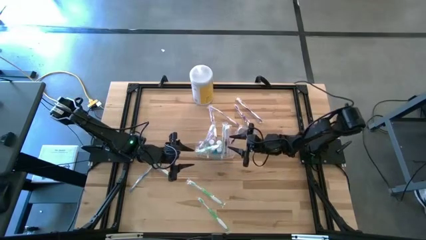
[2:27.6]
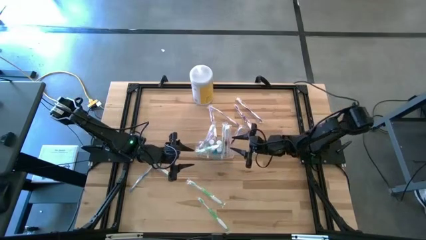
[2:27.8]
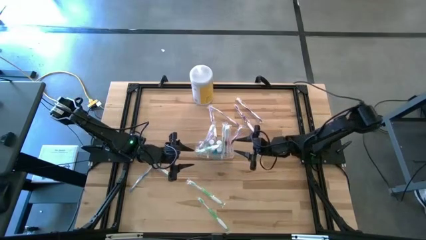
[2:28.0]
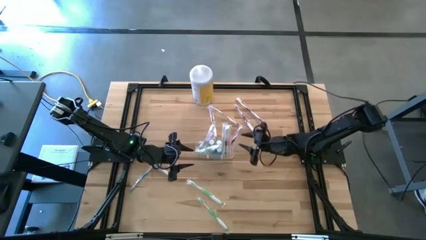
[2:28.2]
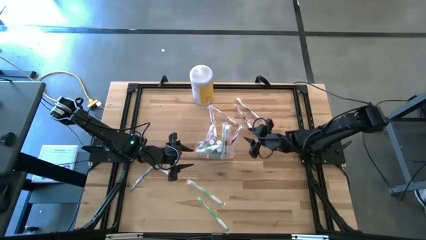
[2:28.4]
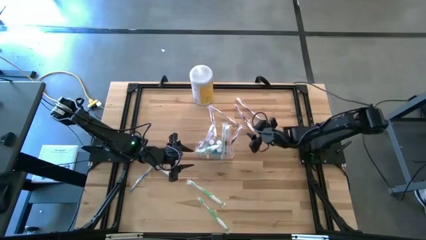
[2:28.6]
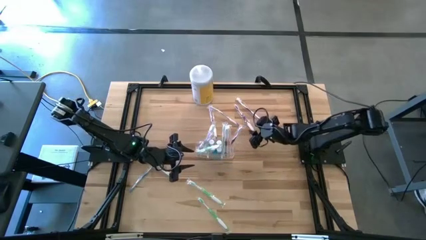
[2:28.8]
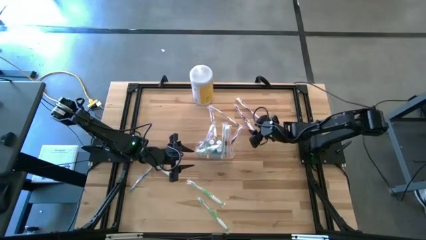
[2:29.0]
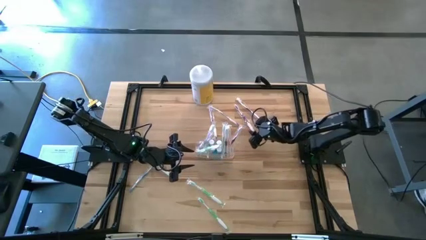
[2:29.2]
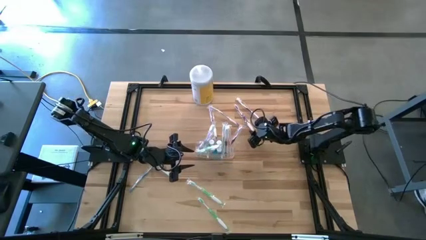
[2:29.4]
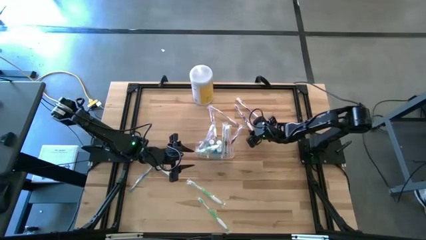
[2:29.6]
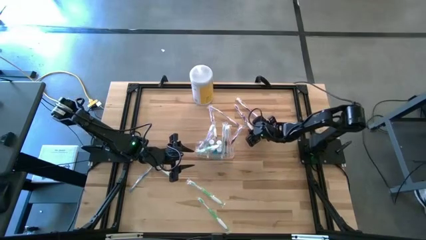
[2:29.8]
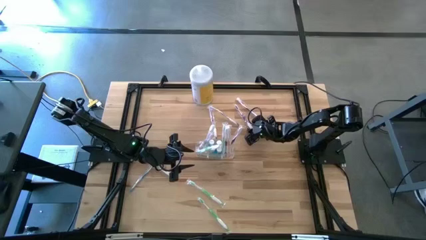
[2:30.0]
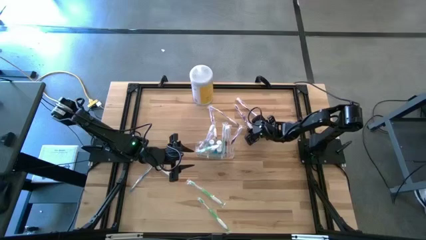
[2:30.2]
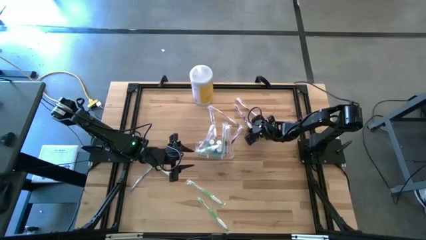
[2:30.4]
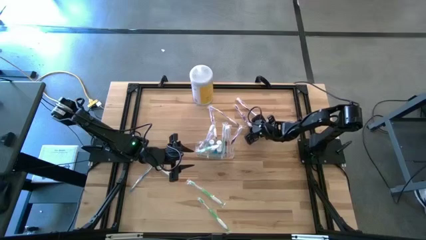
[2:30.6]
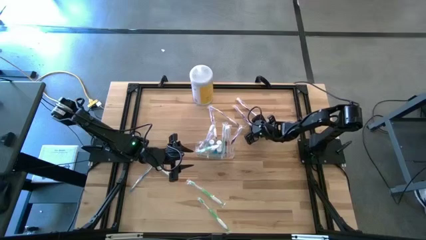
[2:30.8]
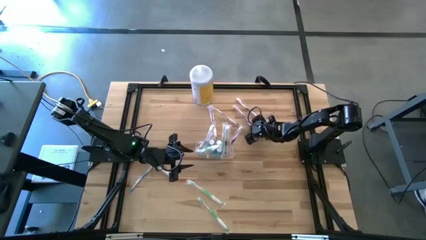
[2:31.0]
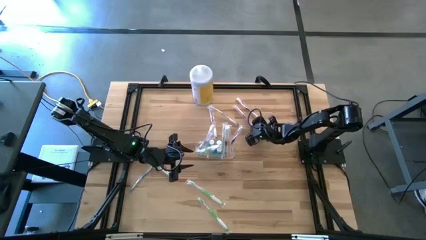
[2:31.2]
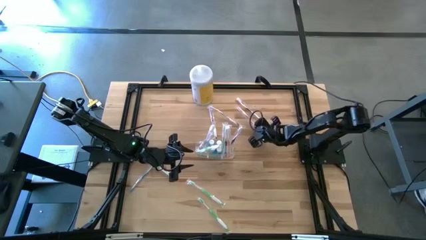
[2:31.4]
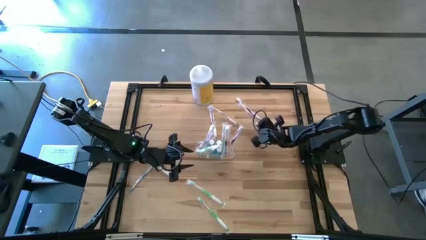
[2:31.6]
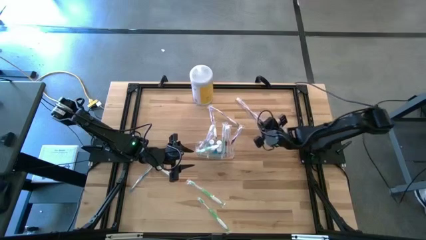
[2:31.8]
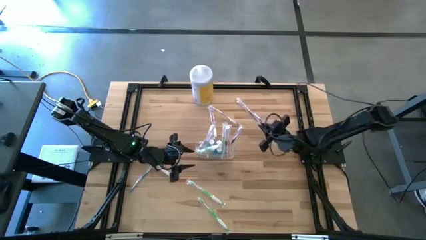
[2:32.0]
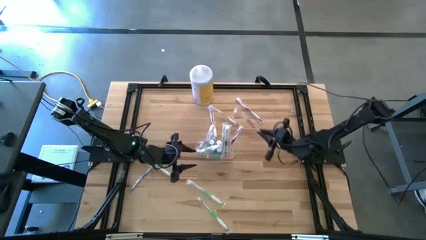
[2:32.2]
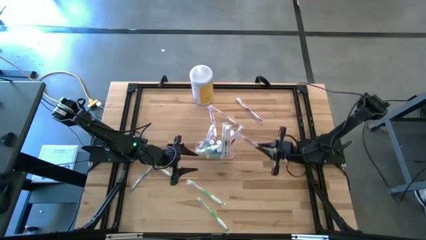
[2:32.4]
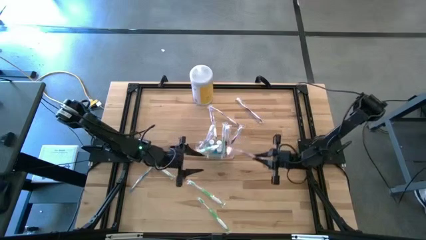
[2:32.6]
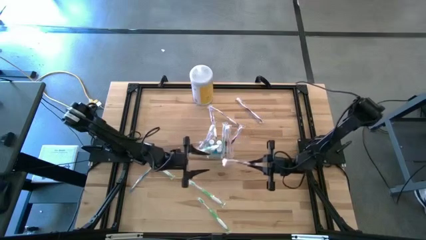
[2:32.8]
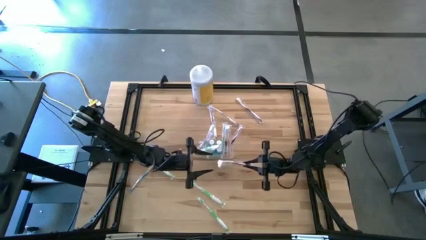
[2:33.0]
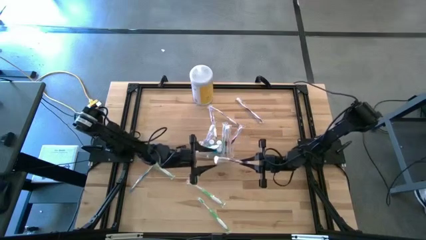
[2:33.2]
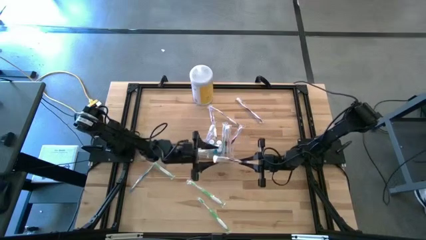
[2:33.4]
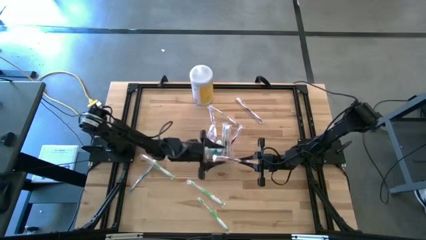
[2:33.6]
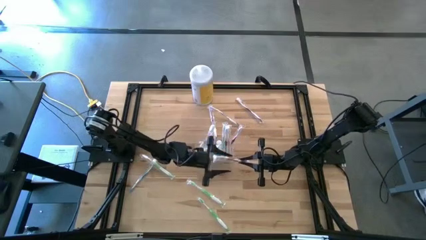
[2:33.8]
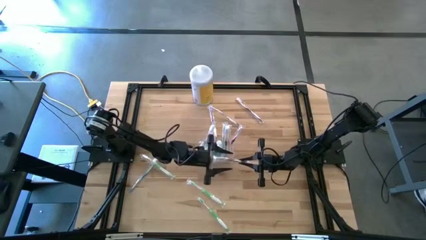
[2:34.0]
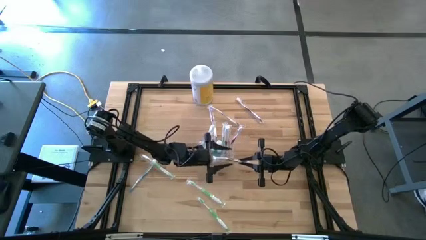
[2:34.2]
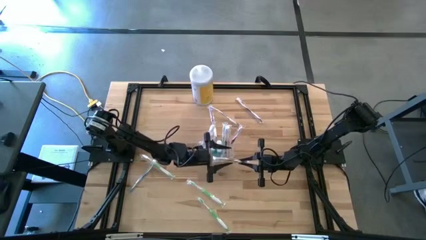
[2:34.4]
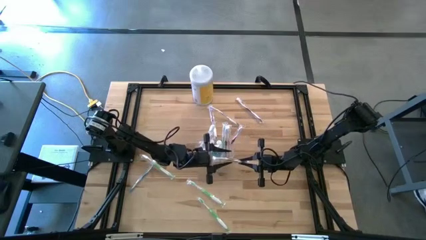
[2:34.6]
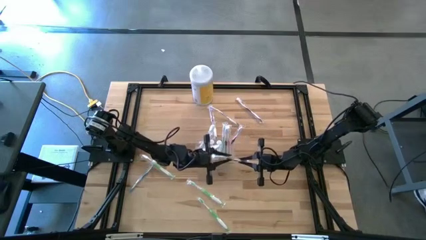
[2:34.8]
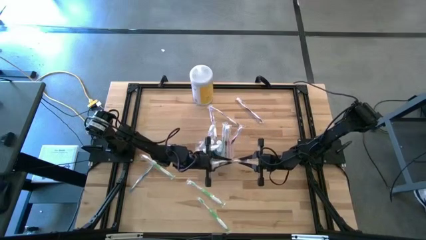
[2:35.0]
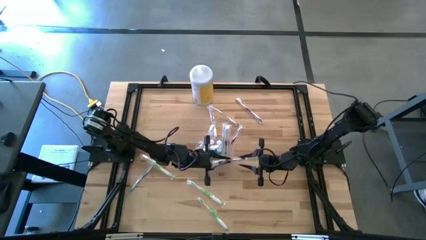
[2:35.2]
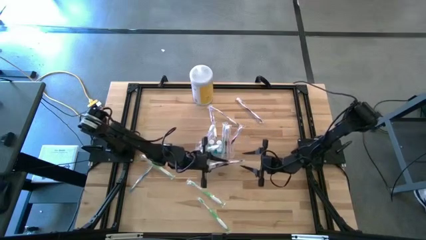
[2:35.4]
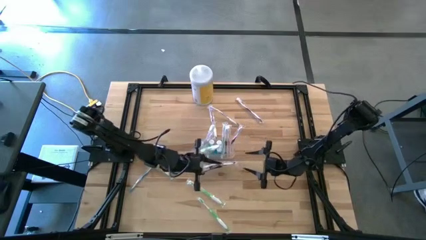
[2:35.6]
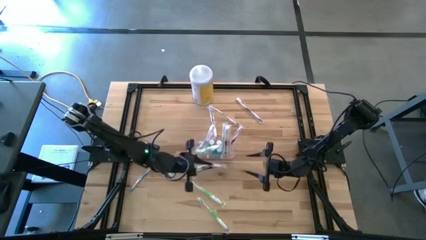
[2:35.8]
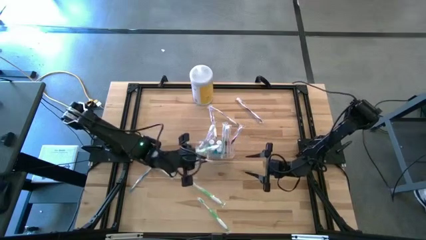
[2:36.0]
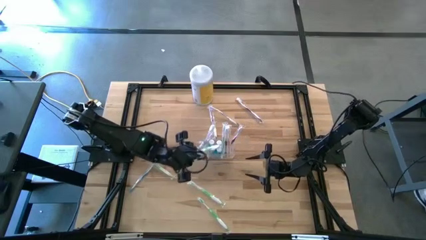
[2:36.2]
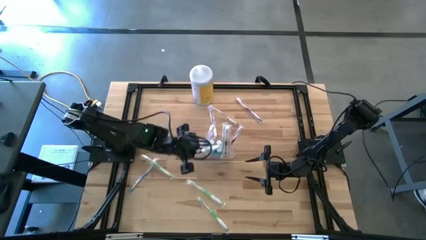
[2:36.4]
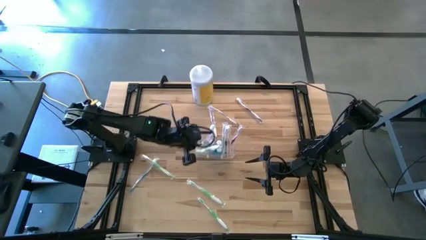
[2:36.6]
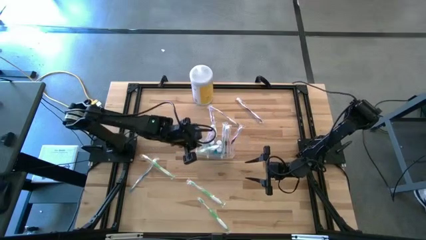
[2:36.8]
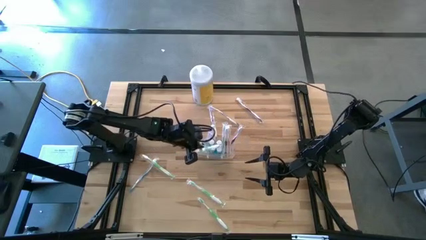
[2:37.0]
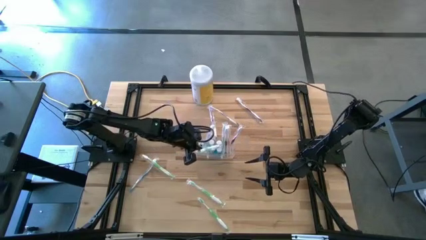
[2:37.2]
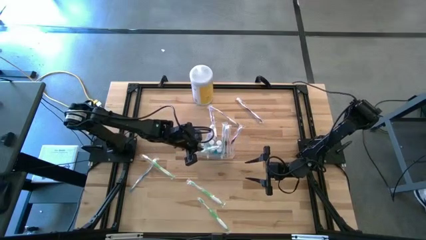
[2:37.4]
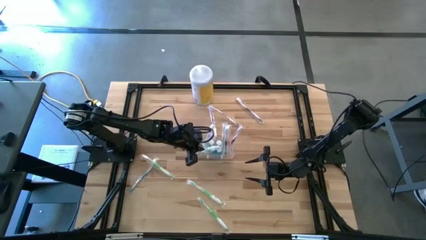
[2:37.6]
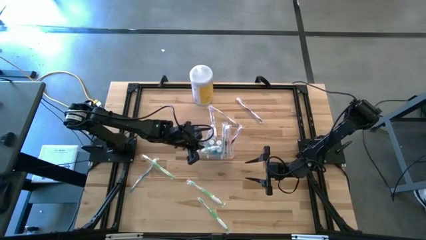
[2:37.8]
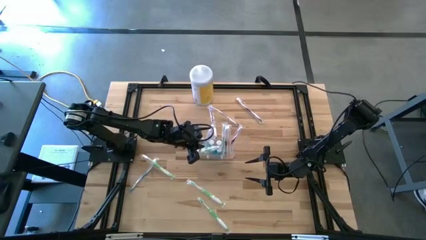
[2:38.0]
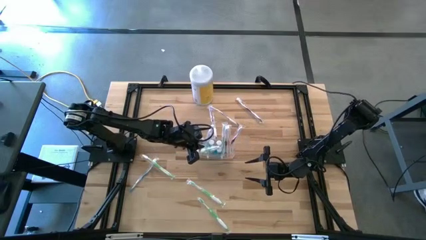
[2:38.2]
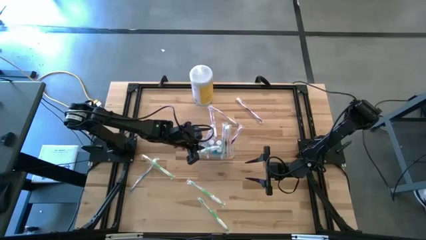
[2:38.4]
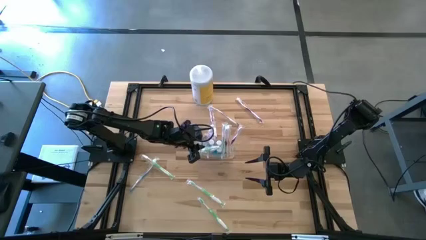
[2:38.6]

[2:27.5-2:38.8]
Task: Pick & Place toothbrushing station
Put the purple toothbrush into the transparent organizer

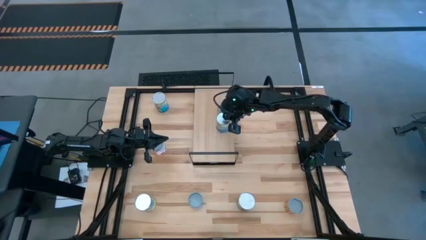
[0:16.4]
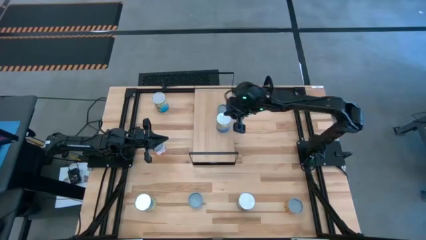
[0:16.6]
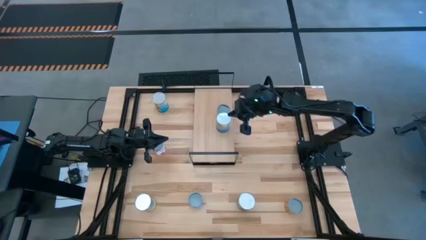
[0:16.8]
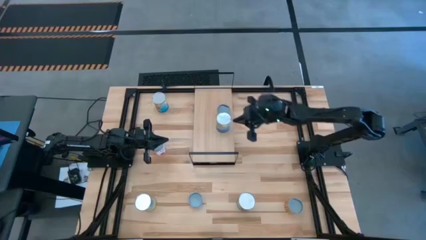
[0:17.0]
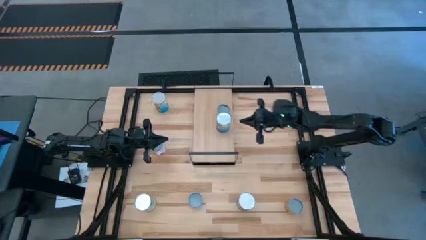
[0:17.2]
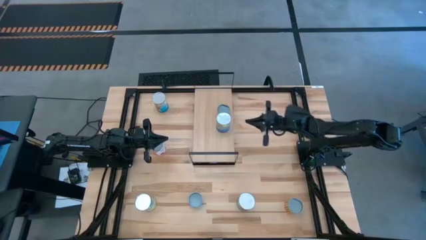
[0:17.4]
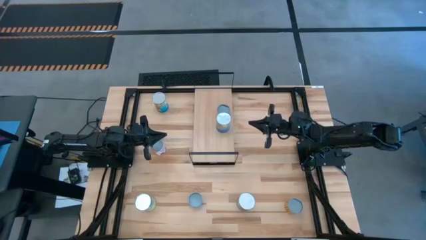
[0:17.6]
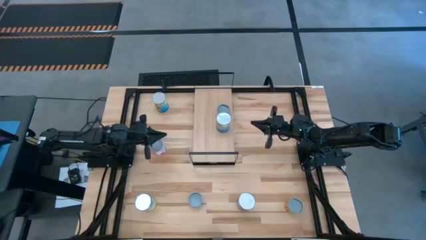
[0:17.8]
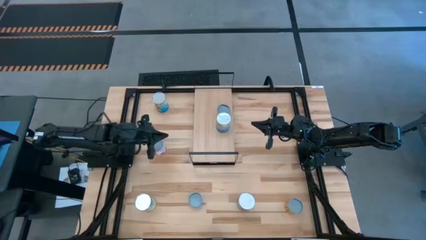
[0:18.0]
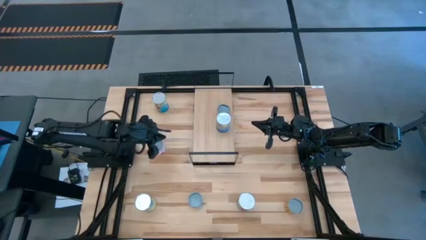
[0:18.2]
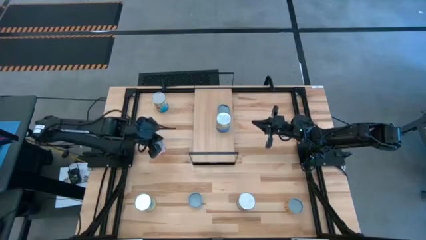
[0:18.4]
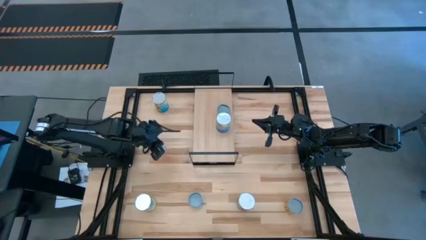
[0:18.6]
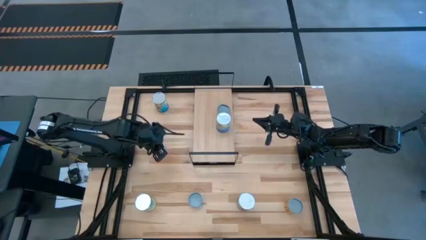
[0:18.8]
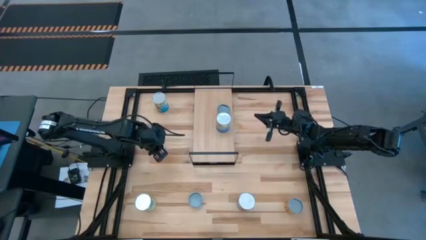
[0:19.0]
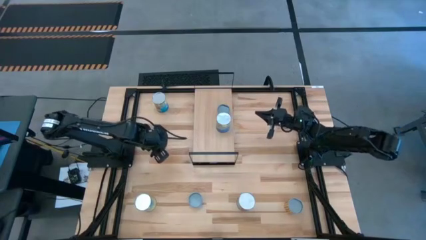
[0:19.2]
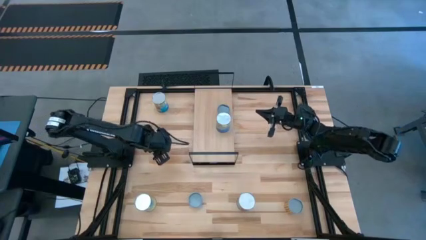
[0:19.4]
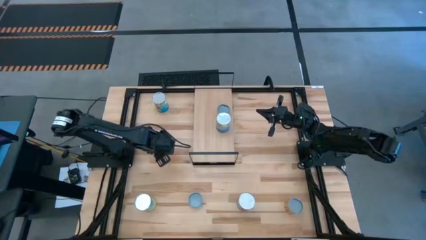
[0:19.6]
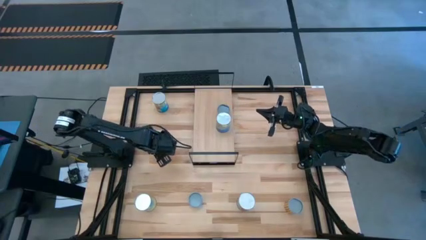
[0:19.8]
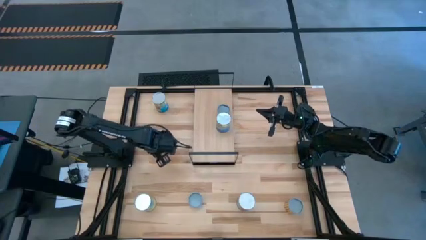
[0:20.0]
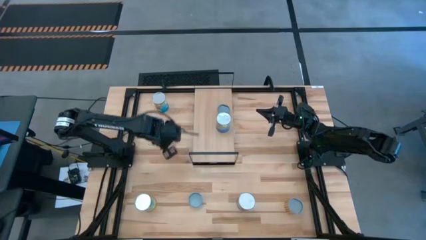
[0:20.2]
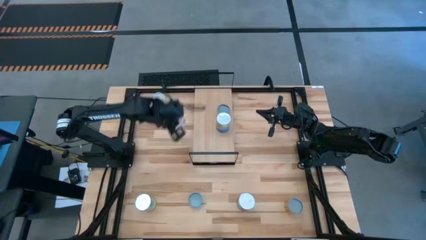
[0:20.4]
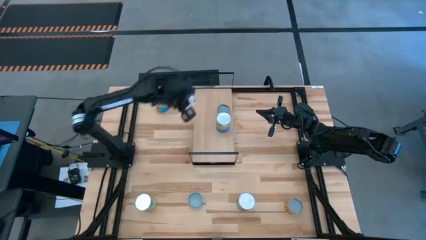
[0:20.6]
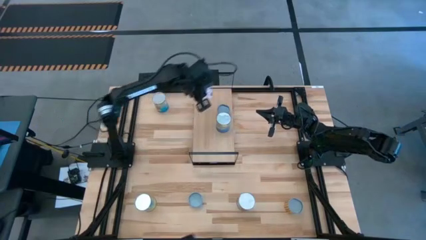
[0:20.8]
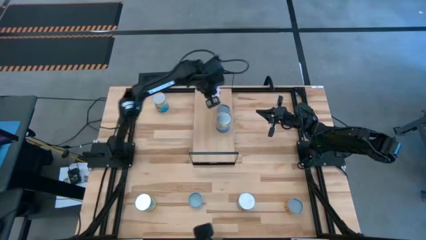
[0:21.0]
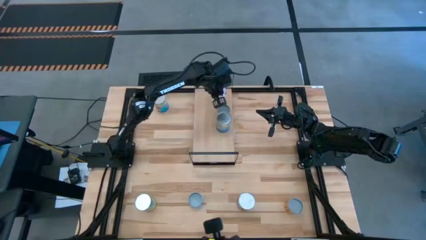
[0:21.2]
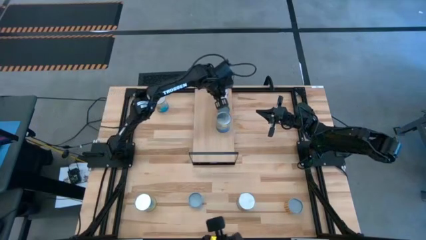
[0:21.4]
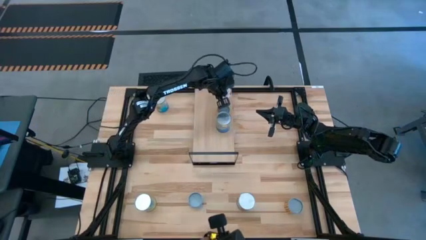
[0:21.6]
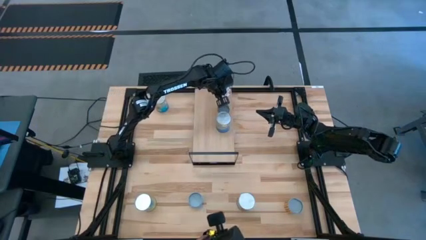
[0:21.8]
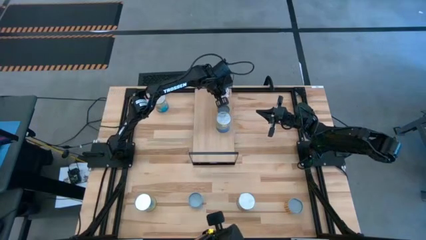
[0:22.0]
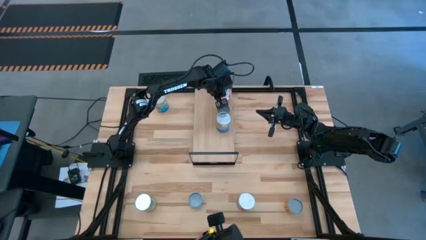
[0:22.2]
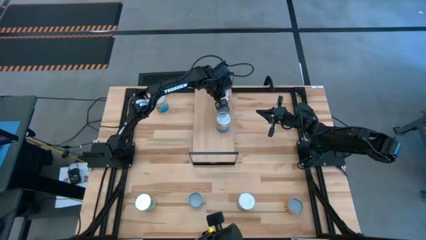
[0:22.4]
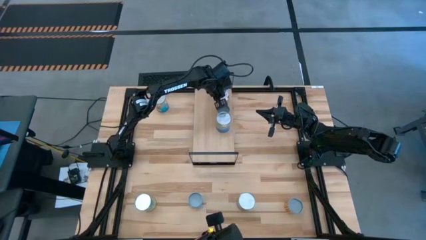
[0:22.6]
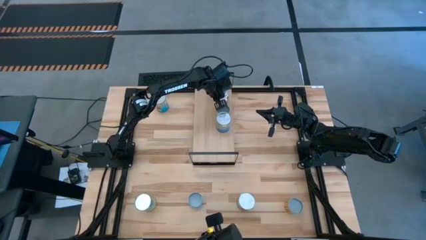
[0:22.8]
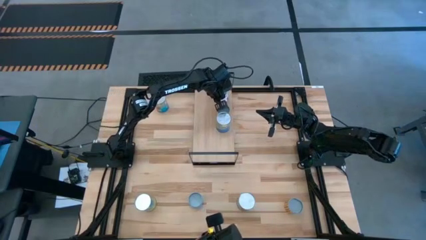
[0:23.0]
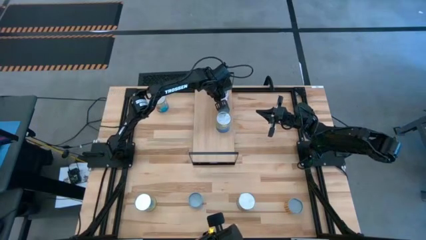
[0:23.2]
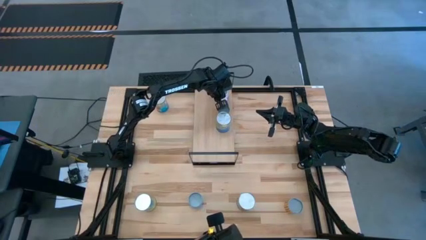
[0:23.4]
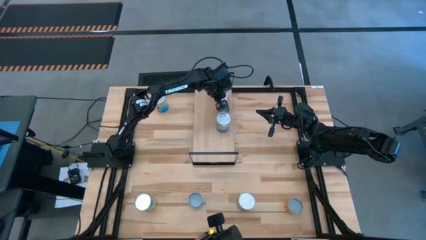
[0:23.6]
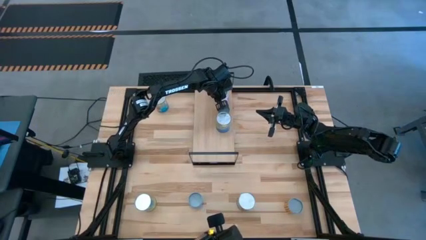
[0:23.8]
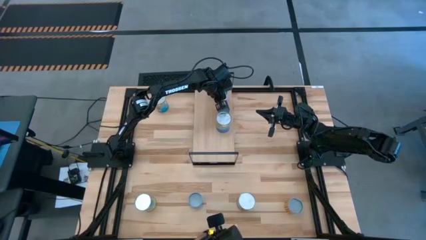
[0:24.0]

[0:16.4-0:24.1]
Task: Pick and place cans onto a shelf
Put the canned meatballs on the shelf
